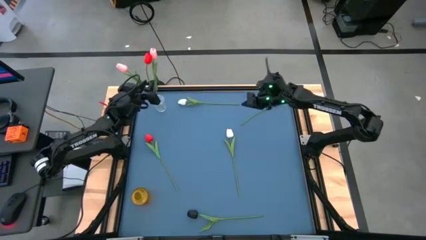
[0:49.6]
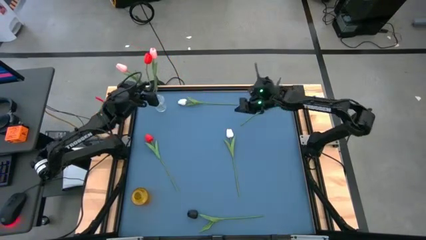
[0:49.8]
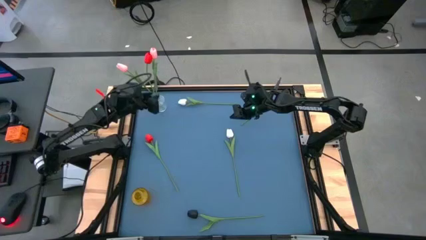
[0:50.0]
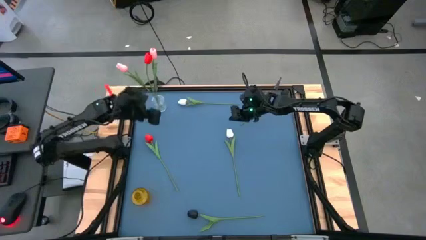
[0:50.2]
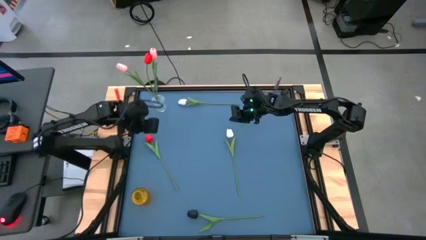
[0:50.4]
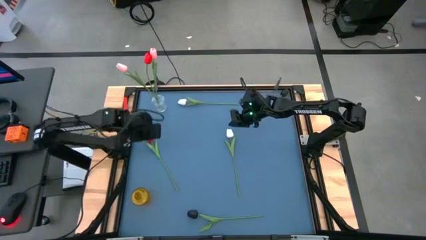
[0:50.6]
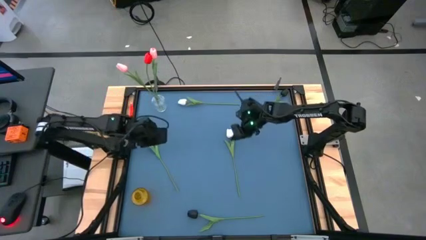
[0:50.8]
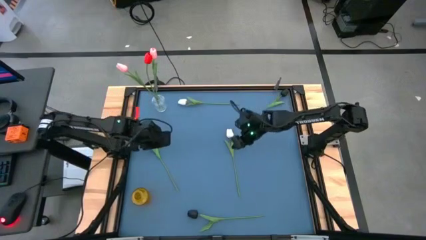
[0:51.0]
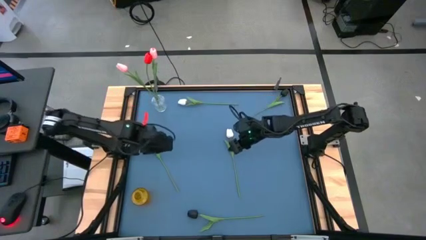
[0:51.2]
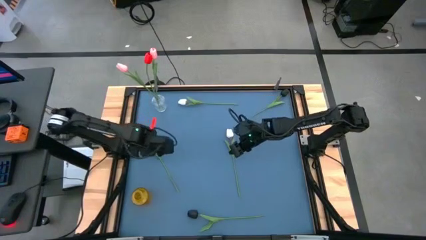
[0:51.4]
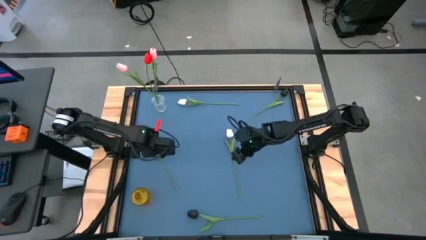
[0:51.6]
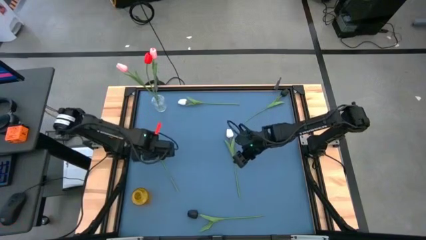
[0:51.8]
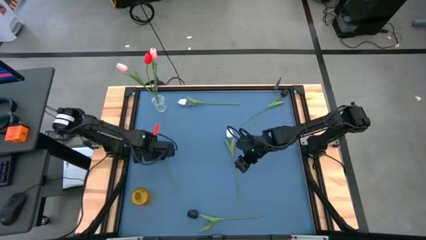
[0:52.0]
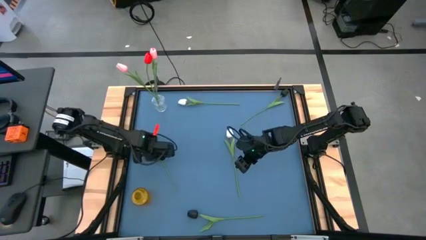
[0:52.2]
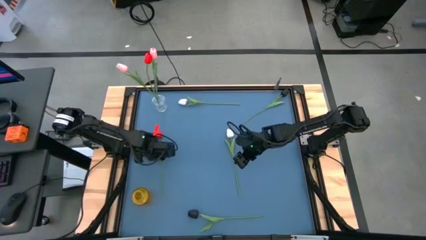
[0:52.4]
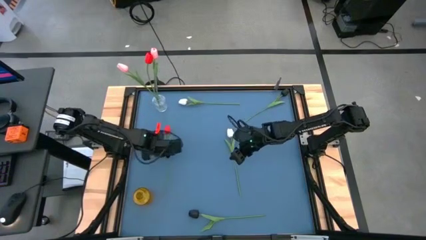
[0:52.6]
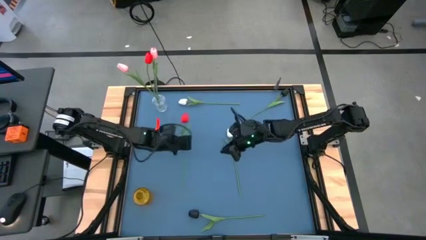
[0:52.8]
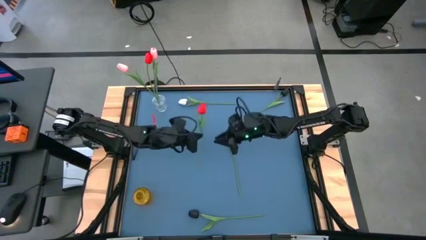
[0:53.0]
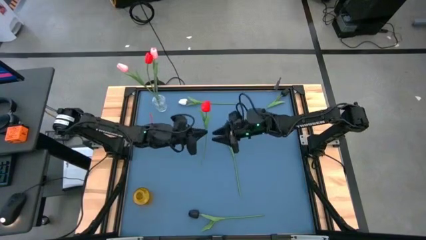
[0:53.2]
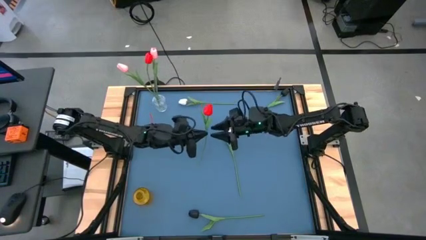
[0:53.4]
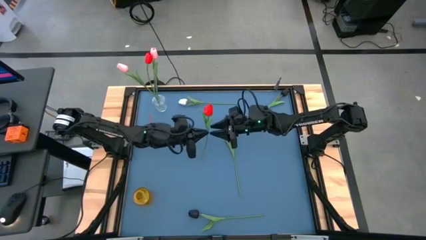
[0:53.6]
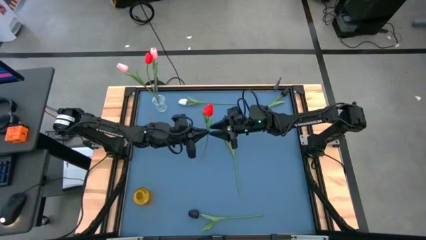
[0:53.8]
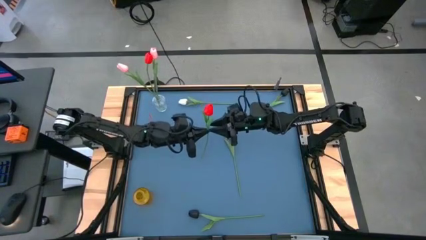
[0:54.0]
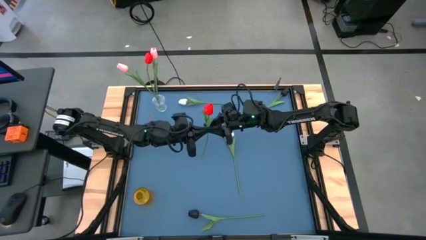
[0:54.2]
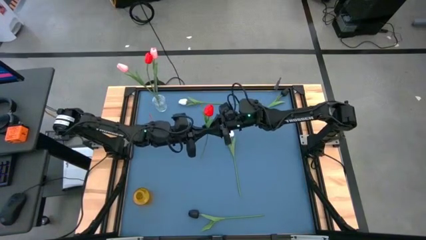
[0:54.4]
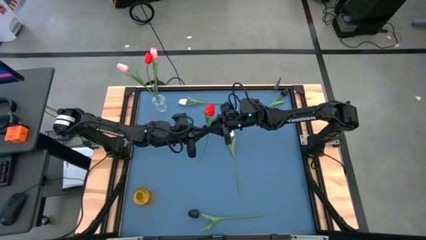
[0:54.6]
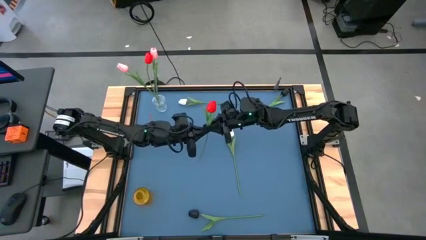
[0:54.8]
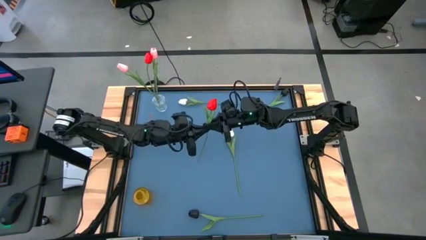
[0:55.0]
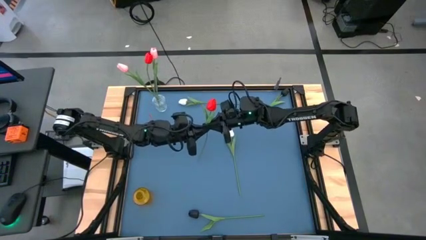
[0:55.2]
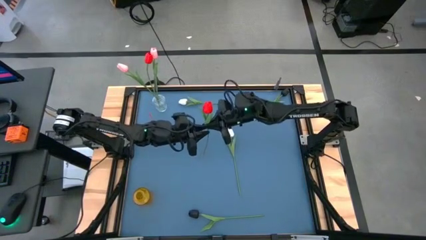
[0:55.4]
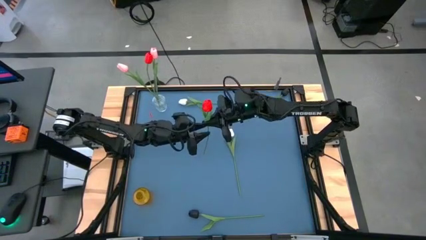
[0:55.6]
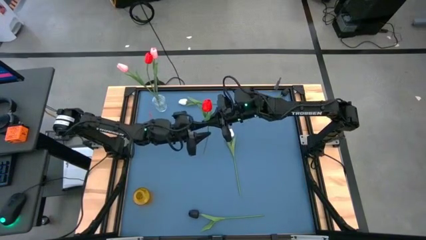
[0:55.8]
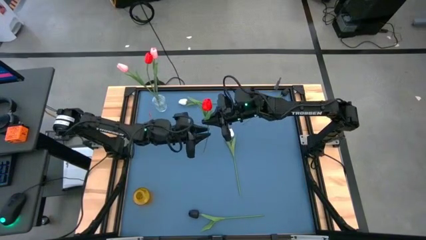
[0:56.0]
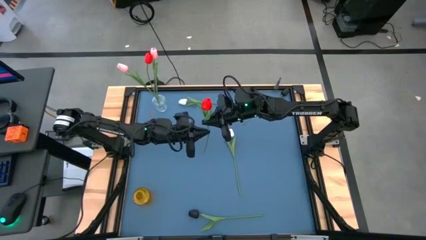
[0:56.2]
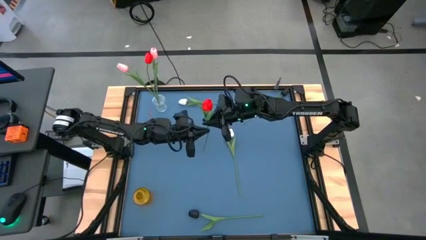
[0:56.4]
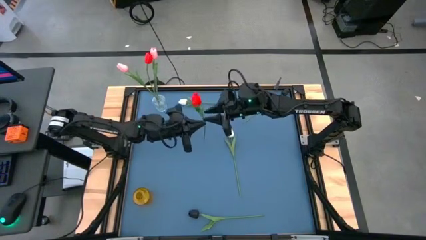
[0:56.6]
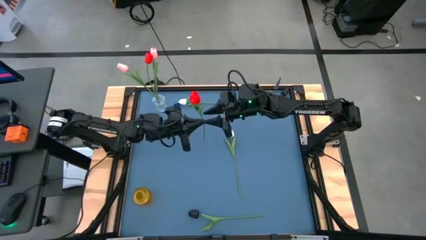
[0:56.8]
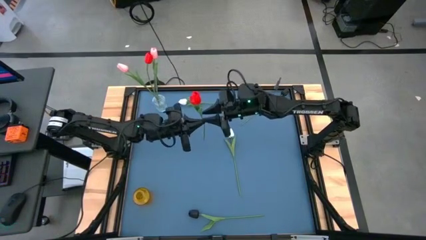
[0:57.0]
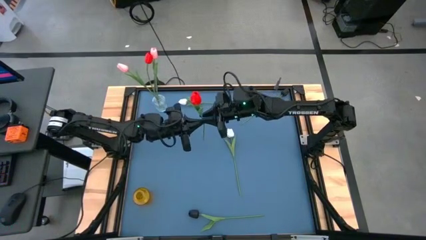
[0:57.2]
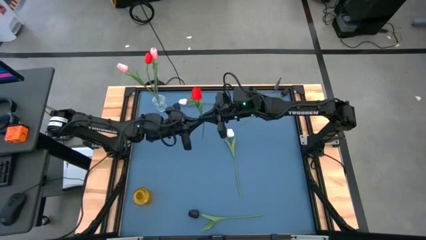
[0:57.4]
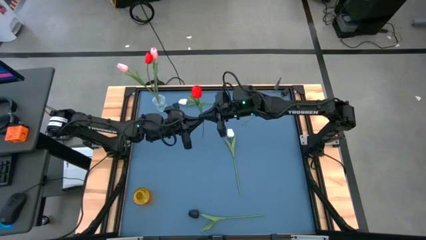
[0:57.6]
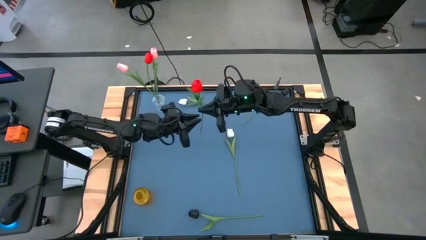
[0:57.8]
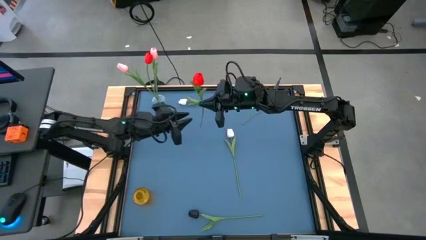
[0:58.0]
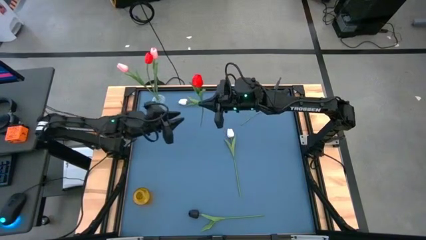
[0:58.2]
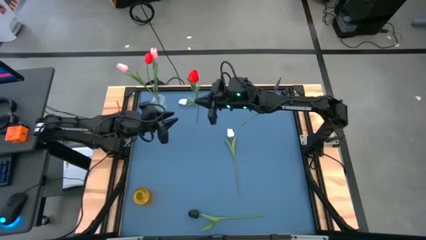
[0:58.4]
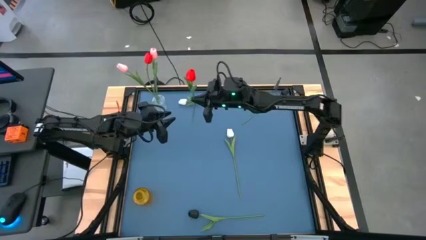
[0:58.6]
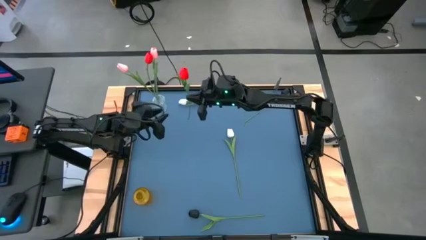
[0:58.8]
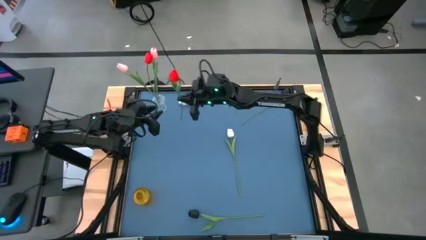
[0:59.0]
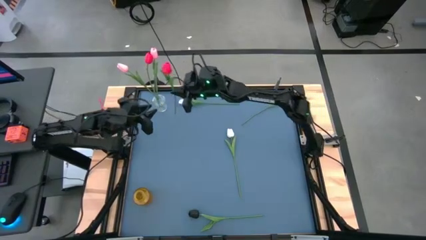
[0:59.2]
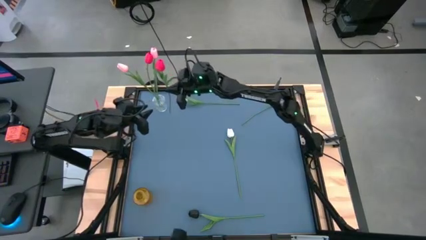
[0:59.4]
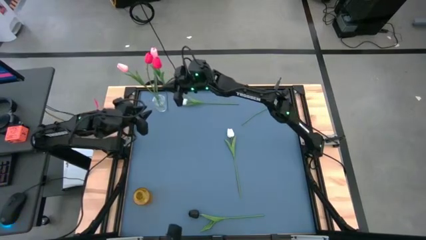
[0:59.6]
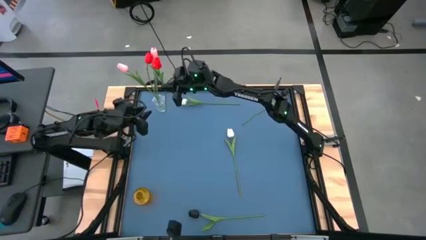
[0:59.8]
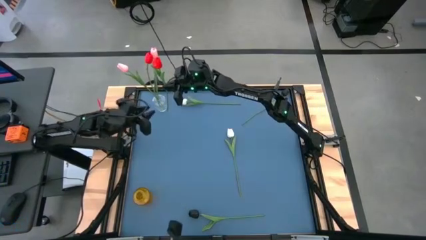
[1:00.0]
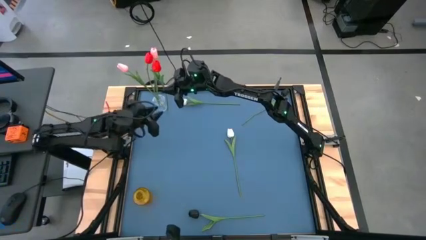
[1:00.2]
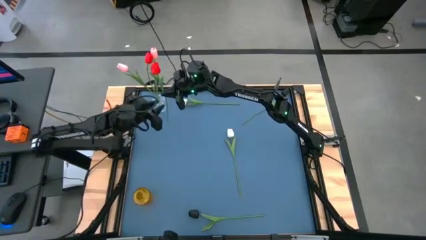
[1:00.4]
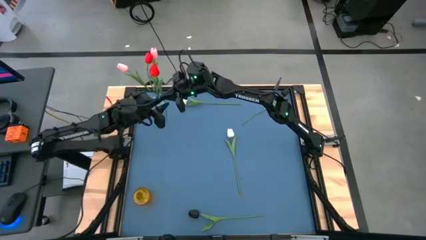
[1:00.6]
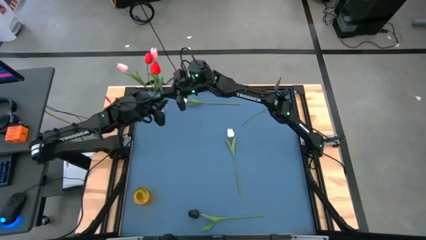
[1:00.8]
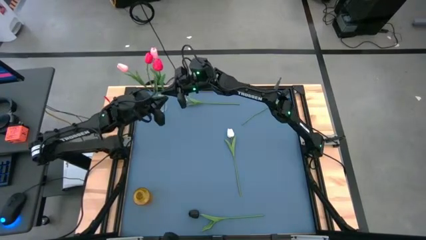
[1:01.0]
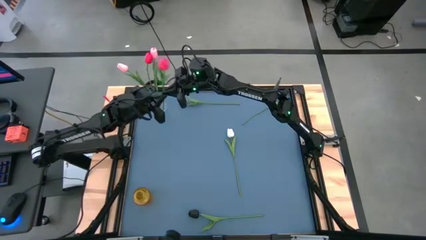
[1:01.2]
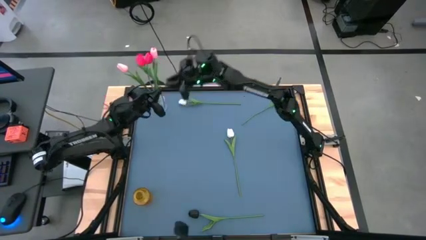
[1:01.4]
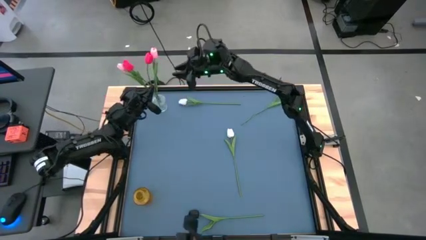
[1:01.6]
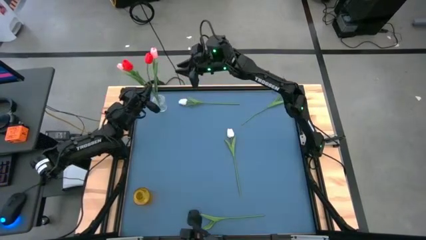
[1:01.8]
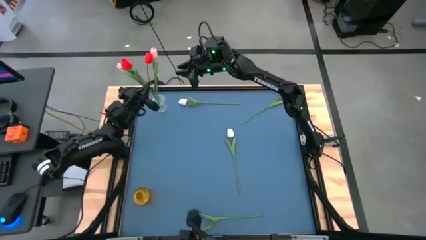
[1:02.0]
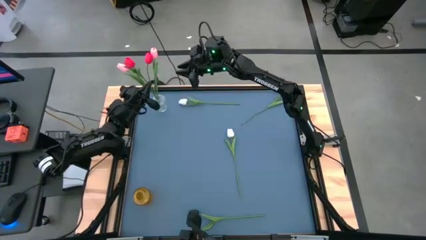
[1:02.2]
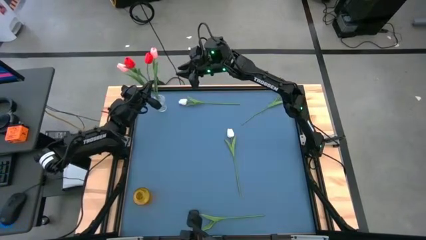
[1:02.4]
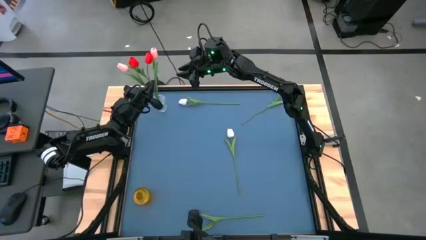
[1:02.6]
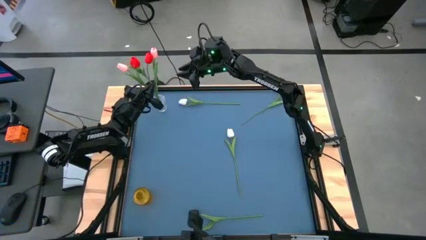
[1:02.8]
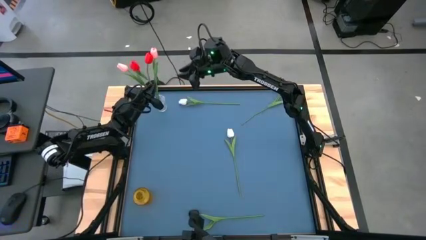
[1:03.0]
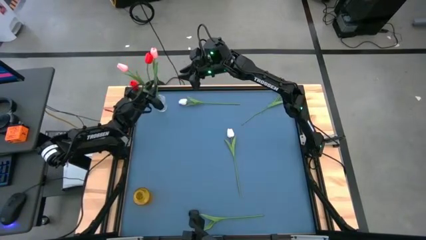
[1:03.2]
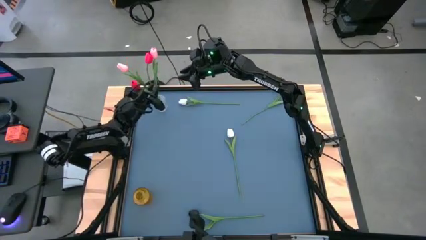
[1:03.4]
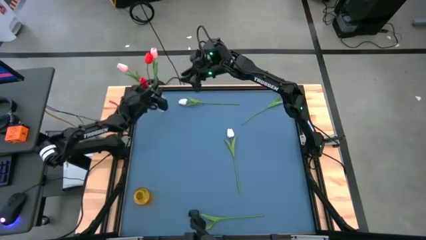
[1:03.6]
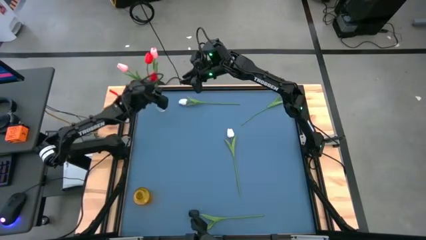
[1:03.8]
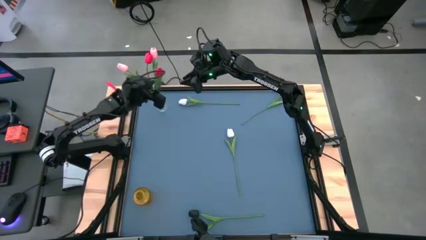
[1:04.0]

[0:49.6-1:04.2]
Task: Sort flowers into vase by color
Put the red tulip into the transparent vase
